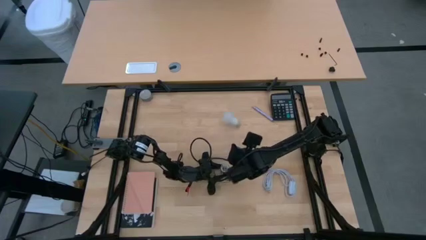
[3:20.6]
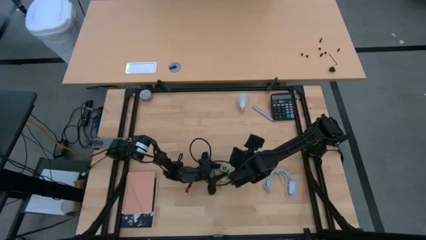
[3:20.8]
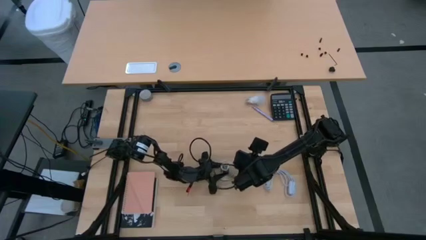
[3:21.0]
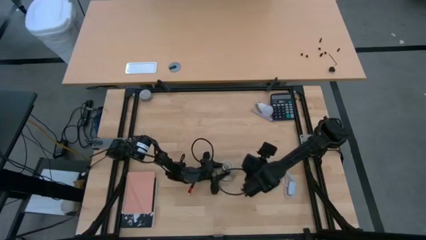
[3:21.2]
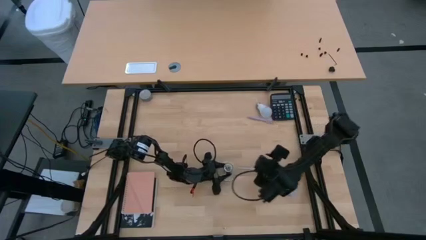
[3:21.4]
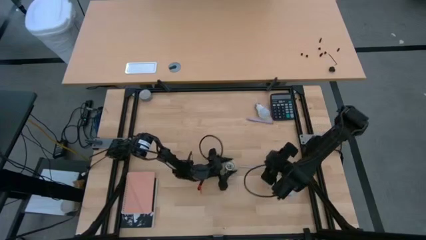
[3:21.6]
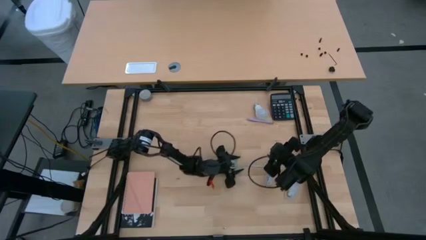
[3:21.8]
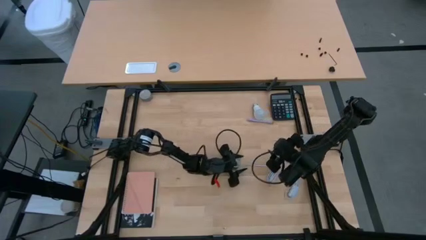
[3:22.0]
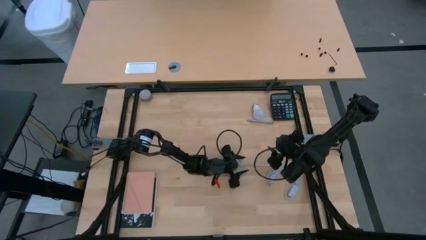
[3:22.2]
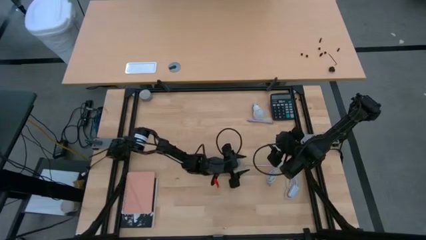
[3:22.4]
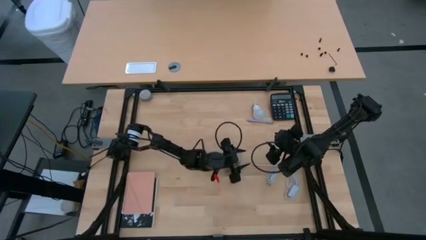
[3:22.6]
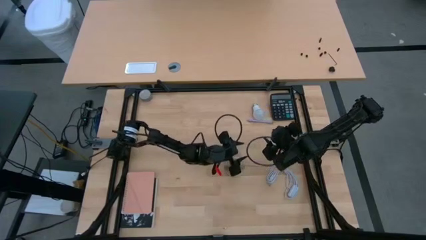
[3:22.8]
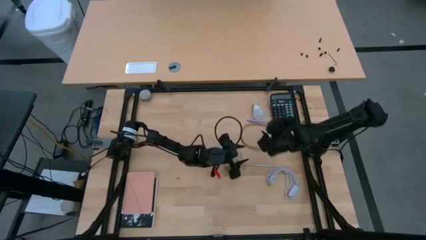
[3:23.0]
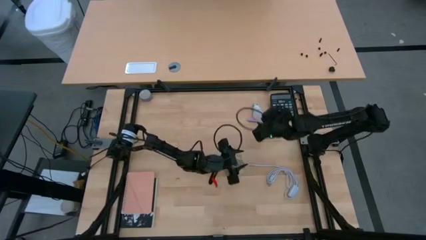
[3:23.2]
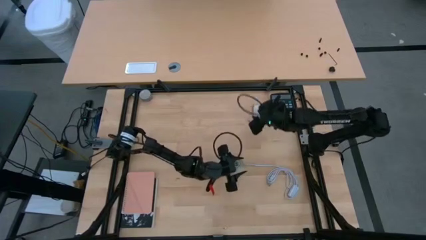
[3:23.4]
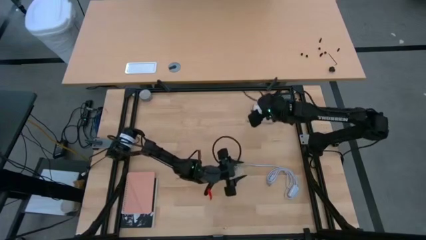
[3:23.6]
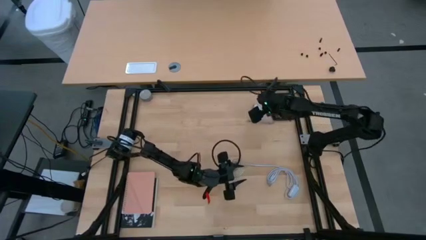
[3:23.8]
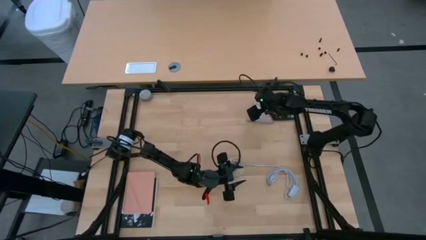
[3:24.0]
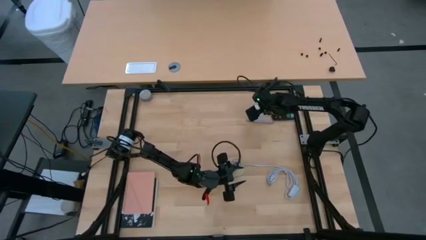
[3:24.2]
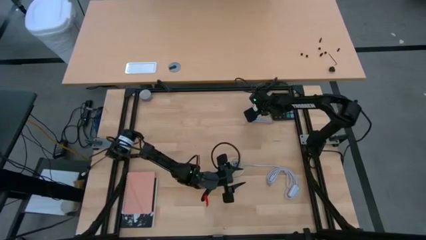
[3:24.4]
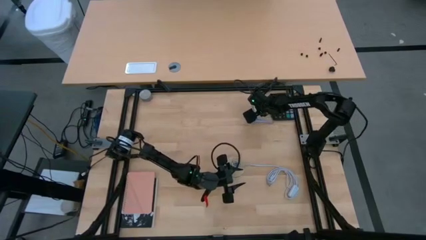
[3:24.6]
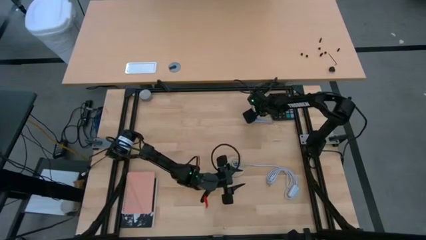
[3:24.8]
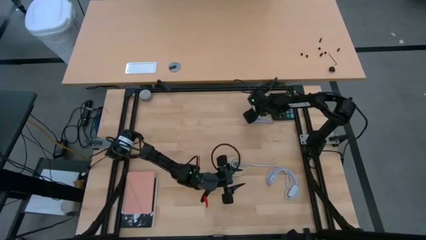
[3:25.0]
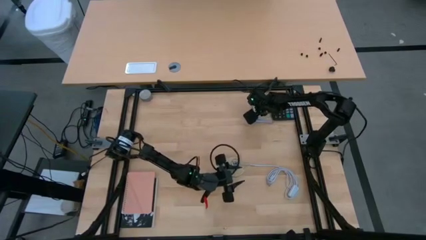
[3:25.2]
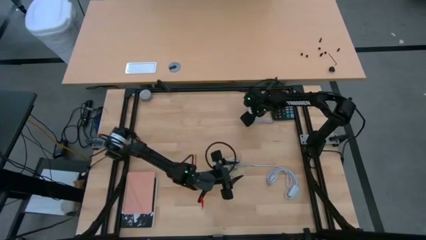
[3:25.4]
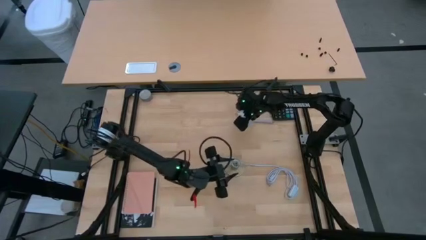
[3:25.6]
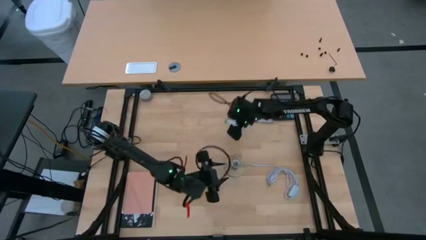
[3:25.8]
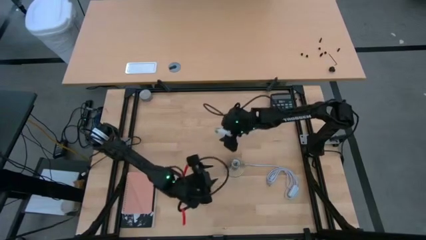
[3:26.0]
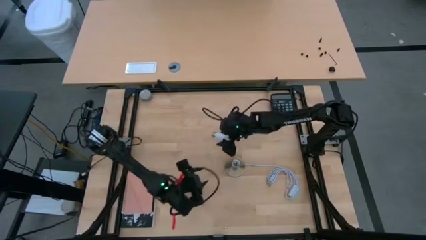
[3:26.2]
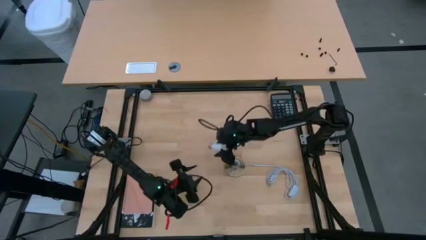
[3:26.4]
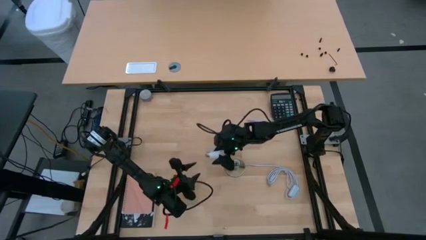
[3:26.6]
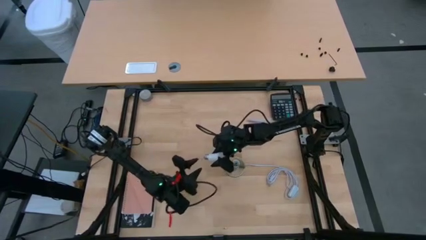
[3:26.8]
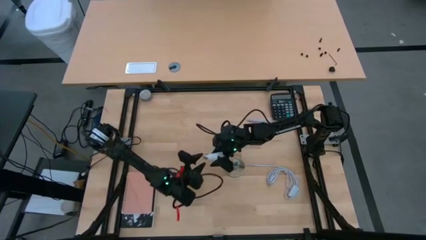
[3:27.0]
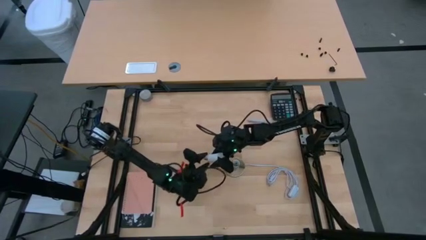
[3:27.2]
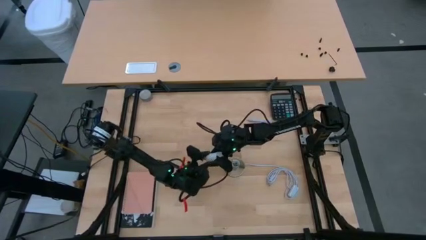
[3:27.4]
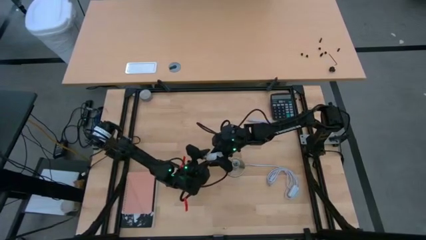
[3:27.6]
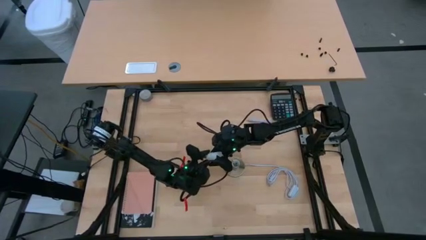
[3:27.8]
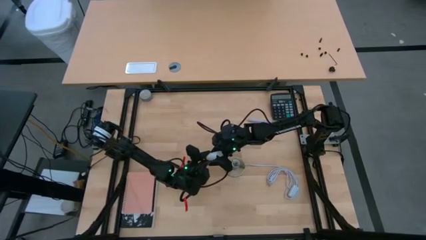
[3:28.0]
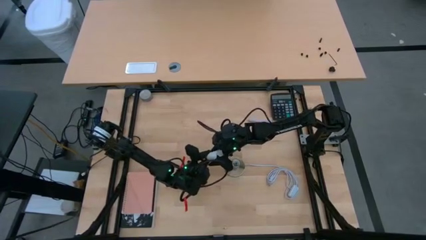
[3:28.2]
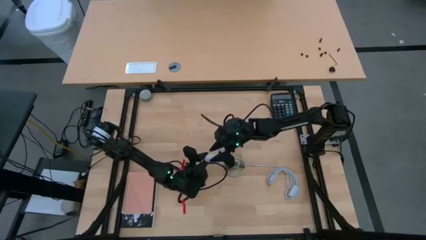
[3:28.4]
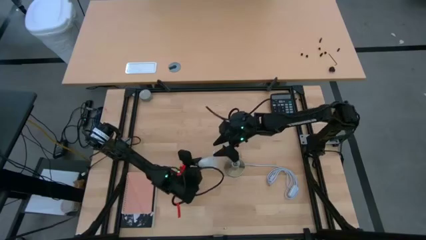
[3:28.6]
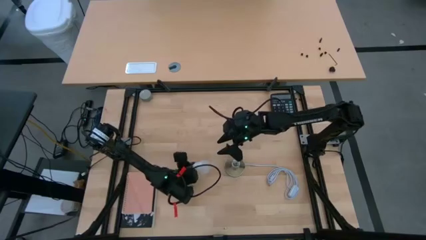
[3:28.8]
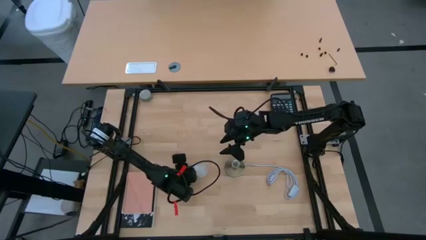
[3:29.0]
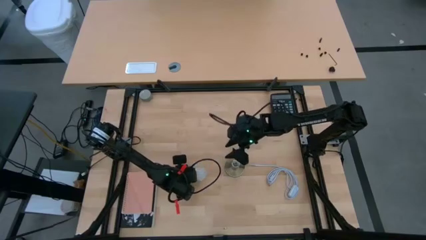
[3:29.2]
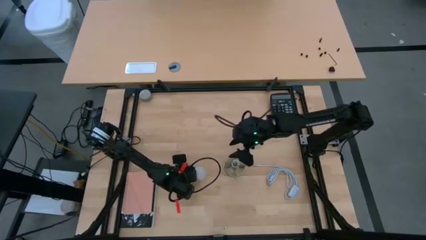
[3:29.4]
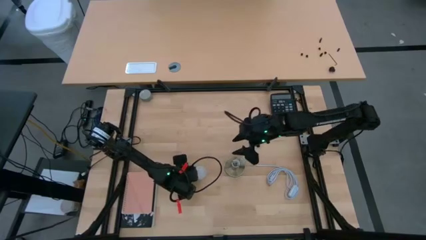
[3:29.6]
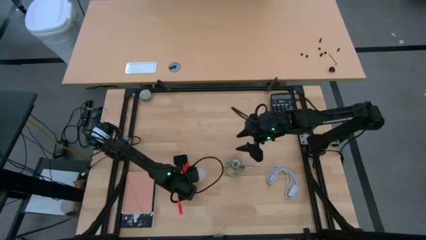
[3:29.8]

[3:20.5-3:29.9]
Task: Screw lightbulb
Move the lightbulb from the top to the center of the table

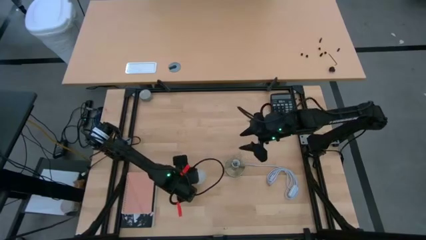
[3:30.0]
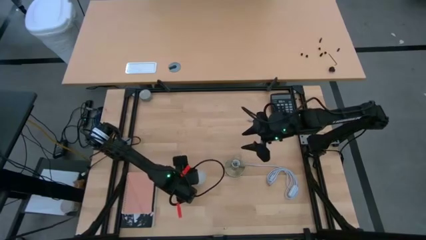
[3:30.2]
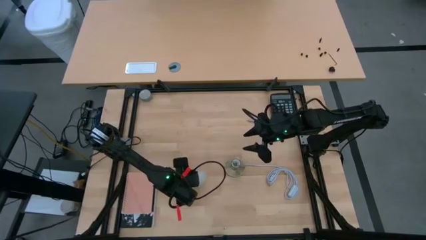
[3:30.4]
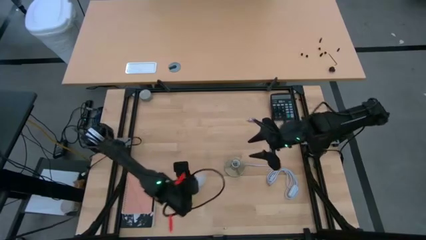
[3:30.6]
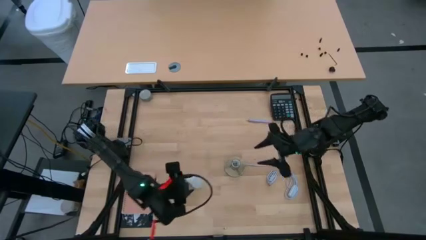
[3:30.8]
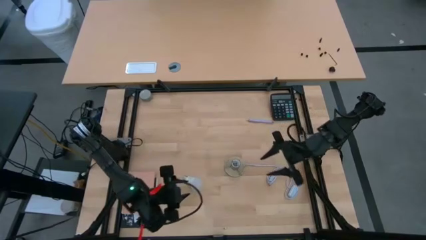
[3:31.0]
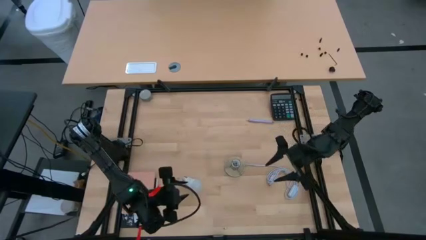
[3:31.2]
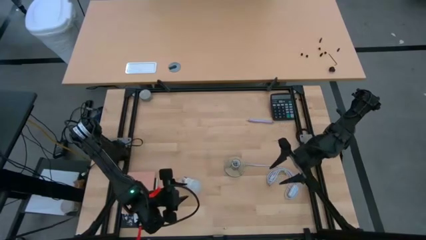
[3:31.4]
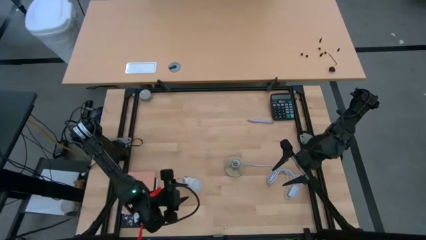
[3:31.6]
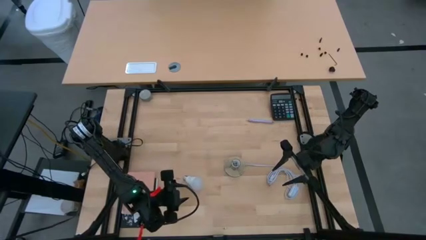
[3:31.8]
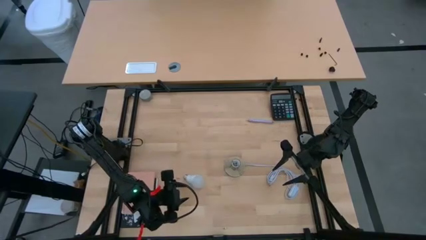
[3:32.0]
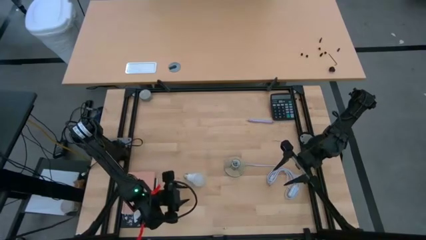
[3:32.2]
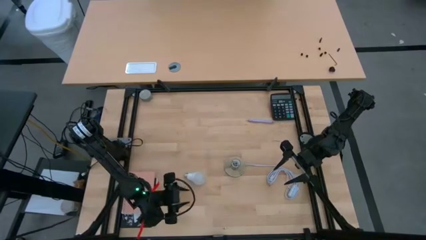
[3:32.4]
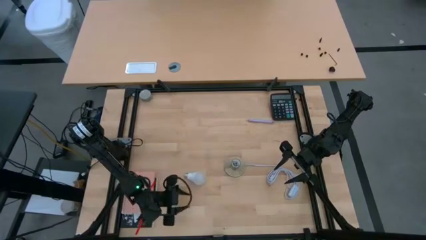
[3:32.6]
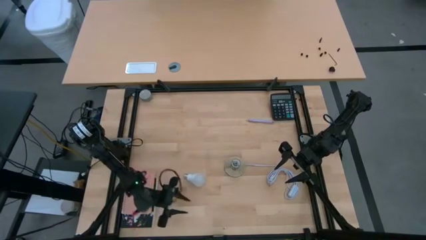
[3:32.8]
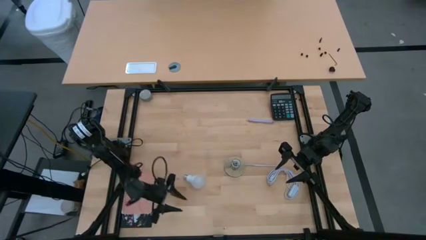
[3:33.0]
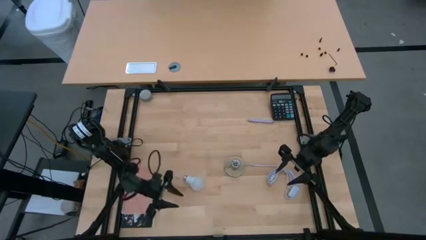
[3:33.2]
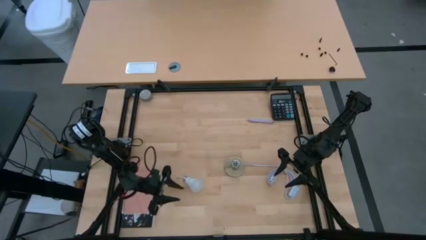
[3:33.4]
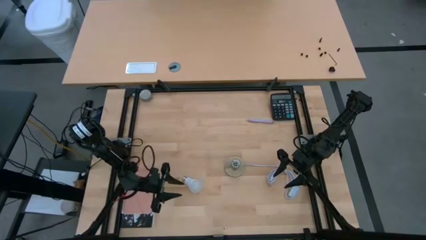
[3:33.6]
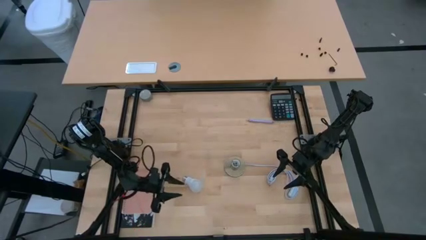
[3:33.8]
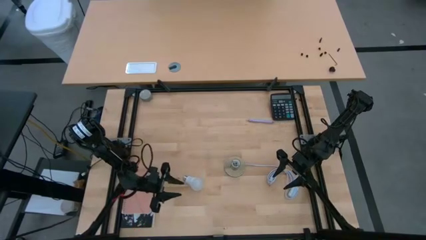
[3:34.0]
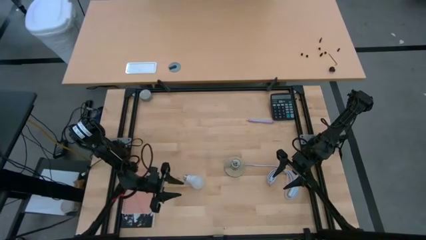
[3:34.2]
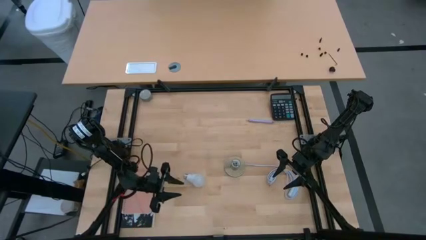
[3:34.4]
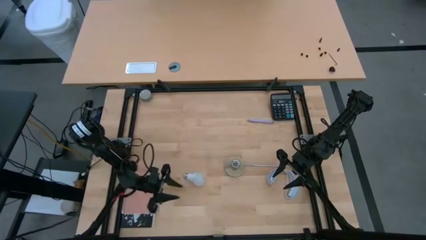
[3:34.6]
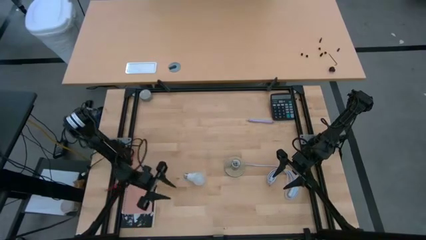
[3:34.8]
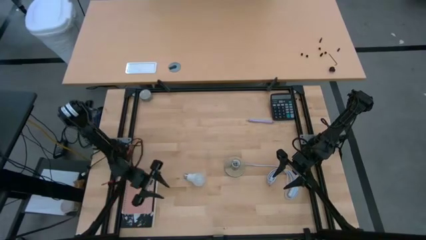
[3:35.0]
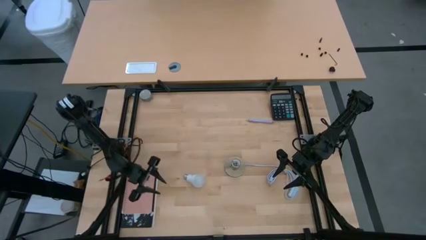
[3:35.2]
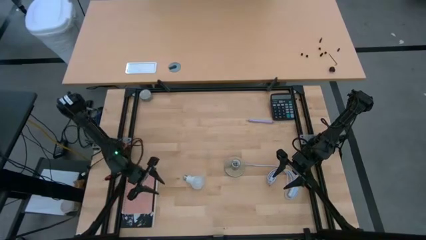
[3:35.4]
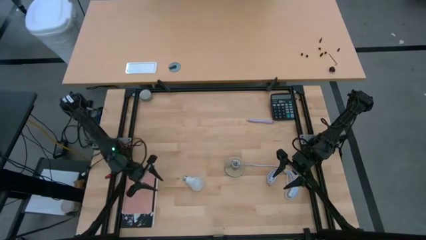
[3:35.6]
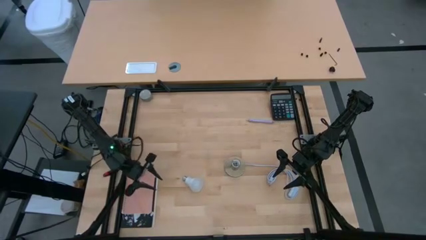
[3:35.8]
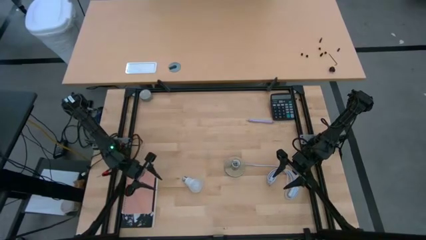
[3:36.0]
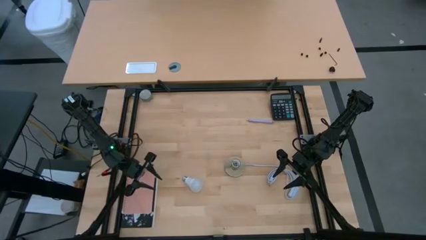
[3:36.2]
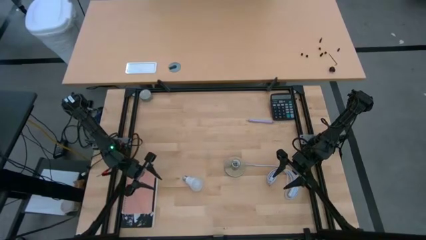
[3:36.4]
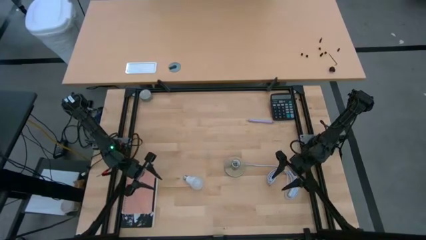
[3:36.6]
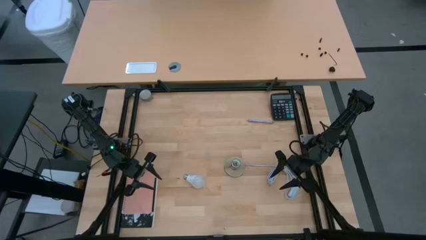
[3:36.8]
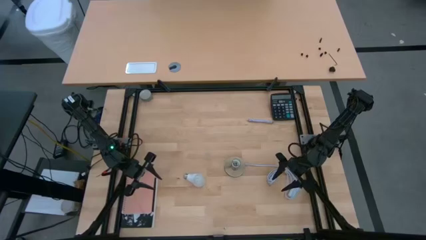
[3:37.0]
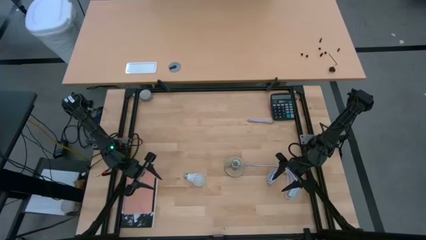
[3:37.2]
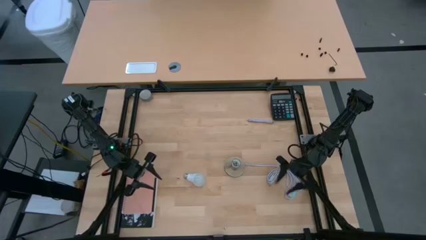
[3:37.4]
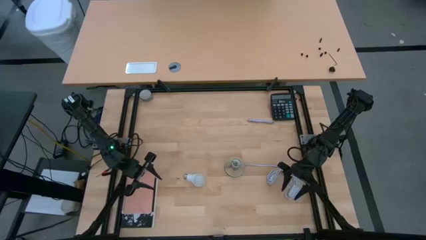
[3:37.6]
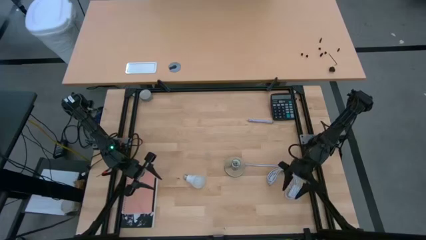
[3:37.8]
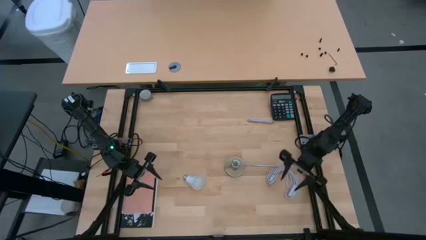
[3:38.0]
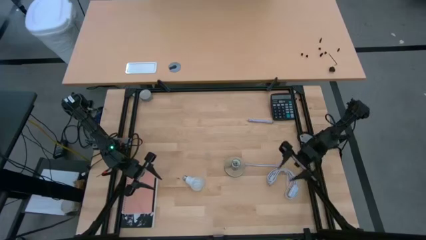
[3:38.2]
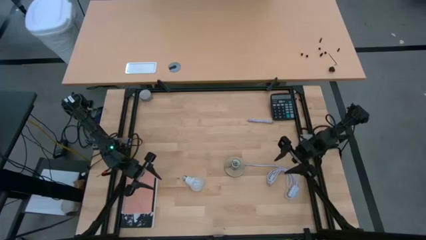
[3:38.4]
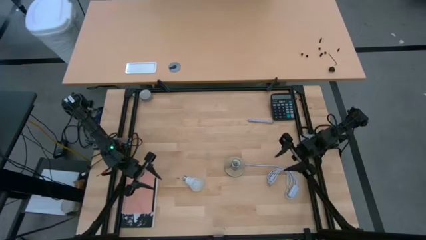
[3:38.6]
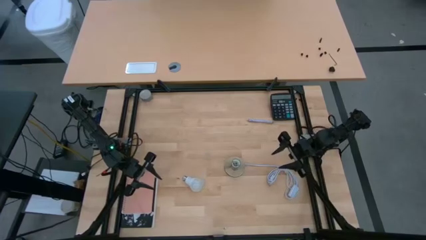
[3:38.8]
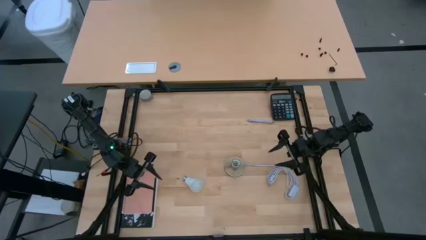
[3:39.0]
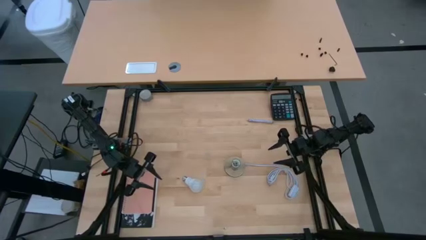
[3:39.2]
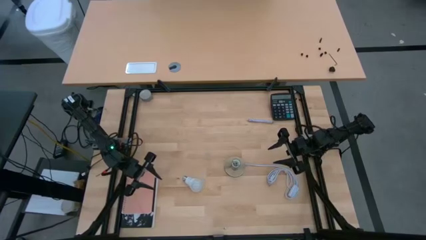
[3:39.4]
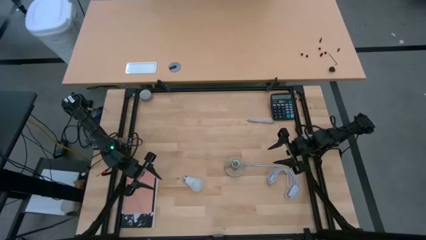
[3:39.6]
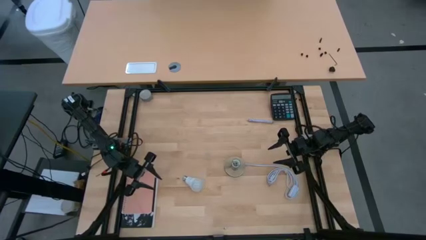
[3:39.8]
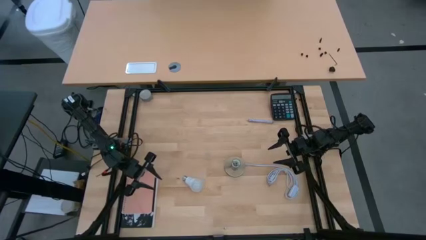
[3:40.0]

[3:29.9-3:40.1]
Return to Home Position
